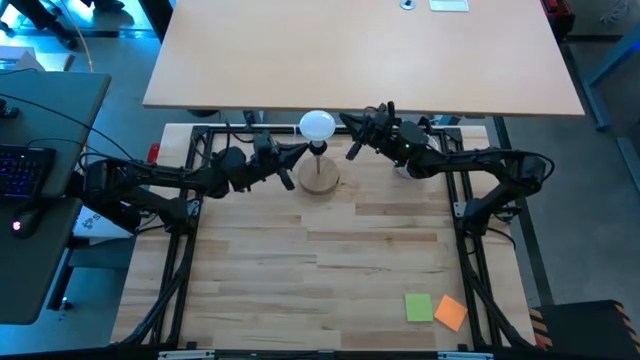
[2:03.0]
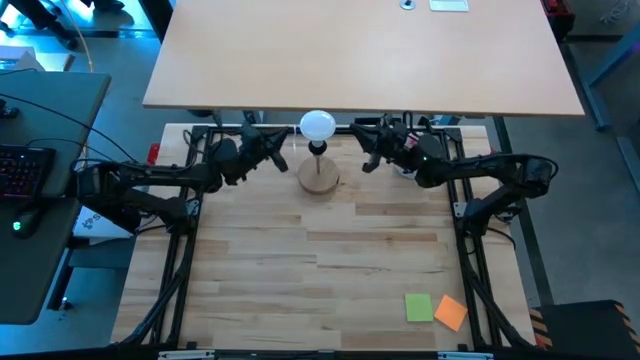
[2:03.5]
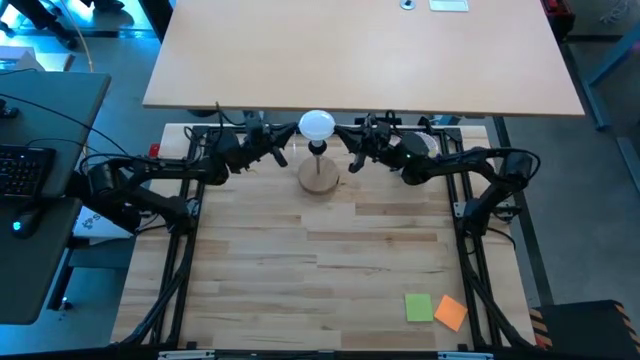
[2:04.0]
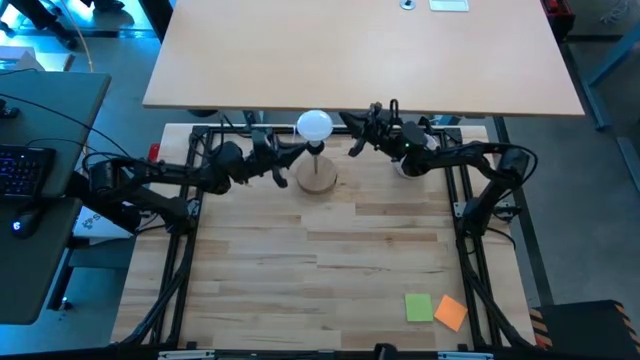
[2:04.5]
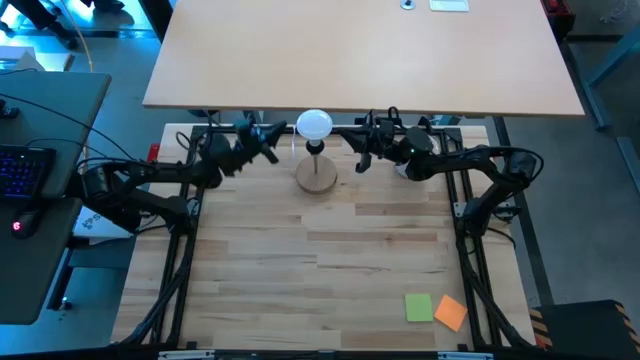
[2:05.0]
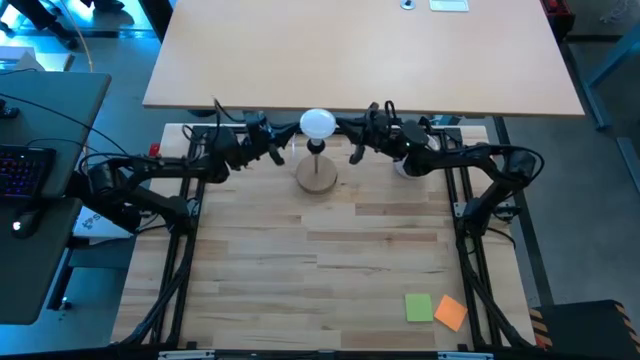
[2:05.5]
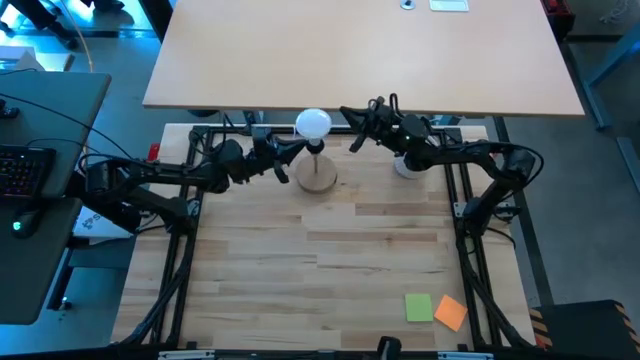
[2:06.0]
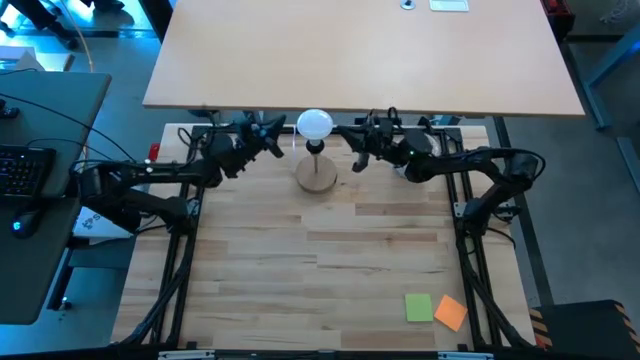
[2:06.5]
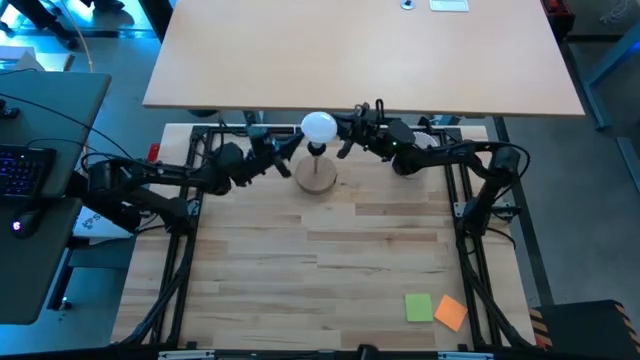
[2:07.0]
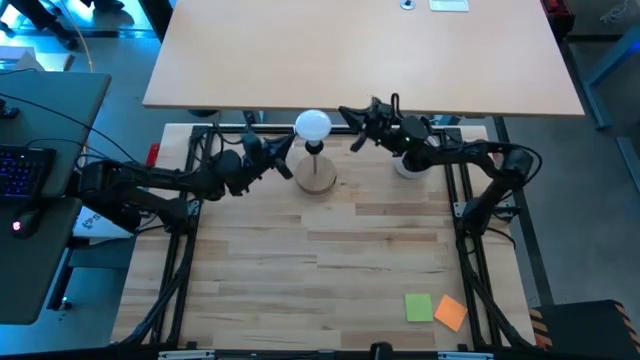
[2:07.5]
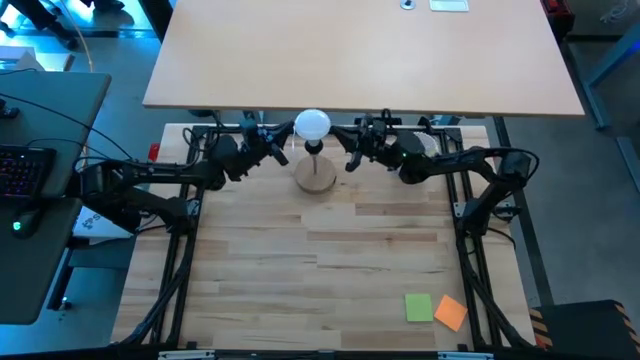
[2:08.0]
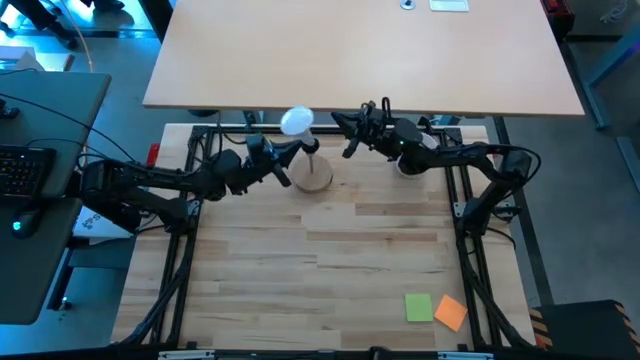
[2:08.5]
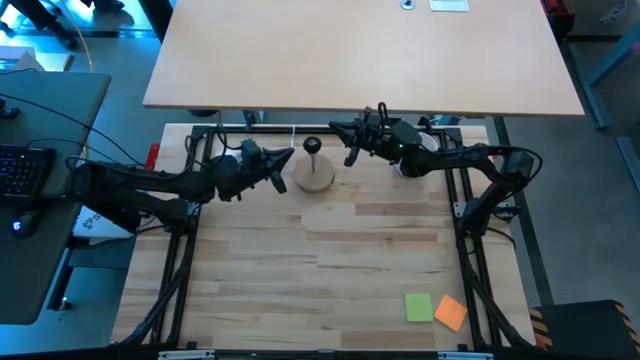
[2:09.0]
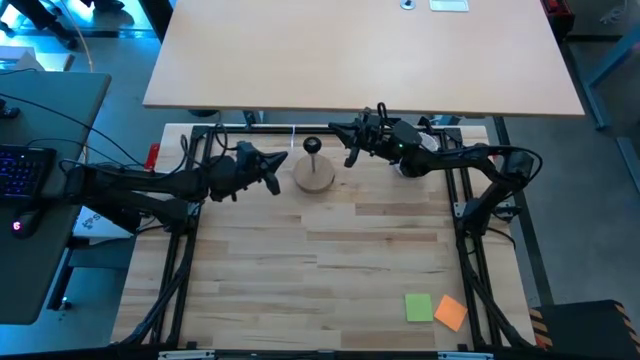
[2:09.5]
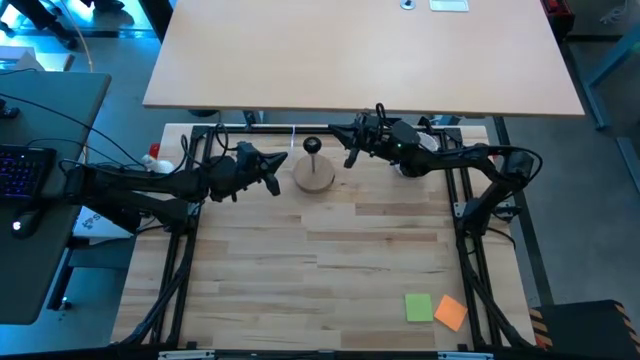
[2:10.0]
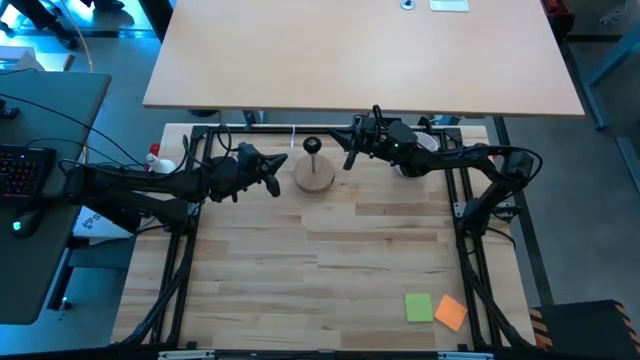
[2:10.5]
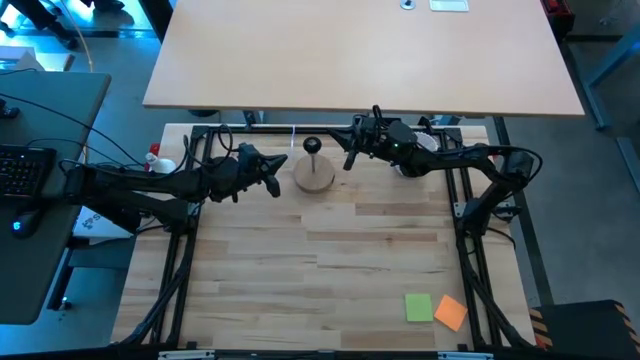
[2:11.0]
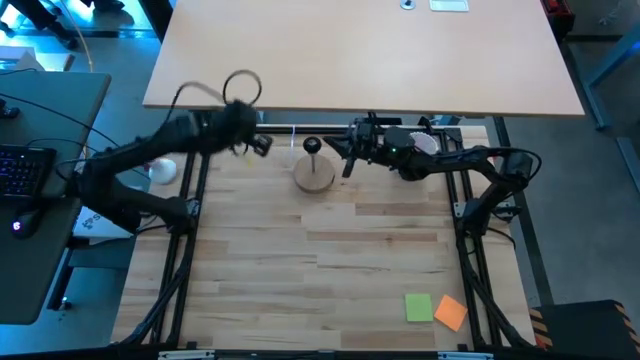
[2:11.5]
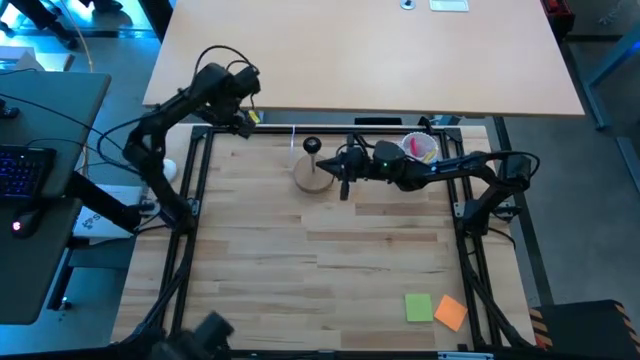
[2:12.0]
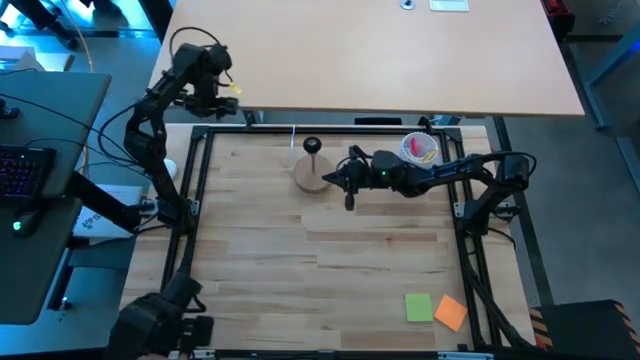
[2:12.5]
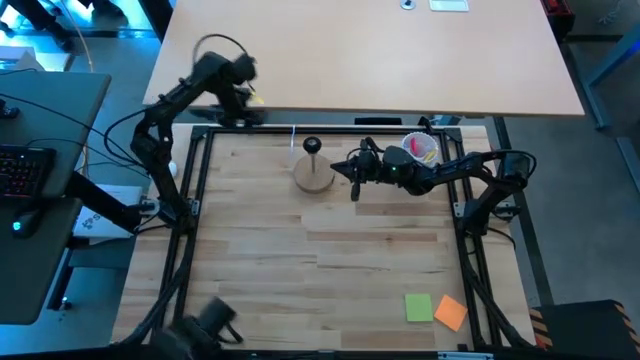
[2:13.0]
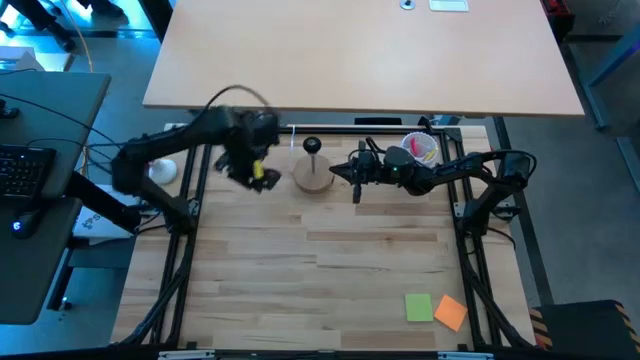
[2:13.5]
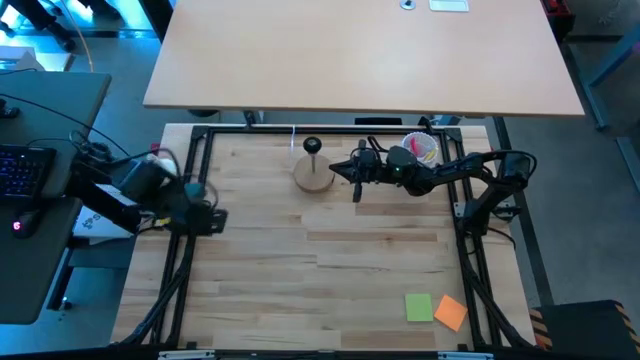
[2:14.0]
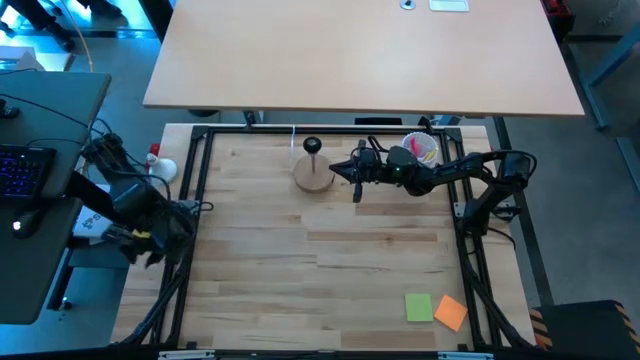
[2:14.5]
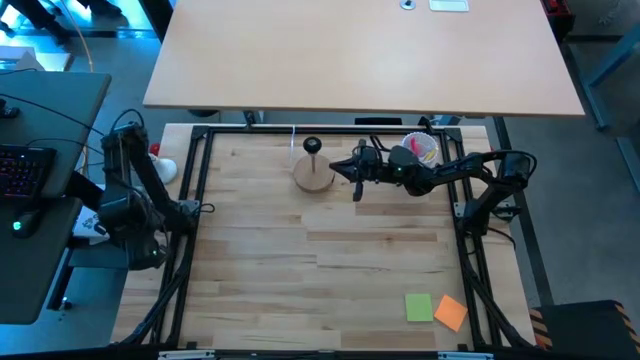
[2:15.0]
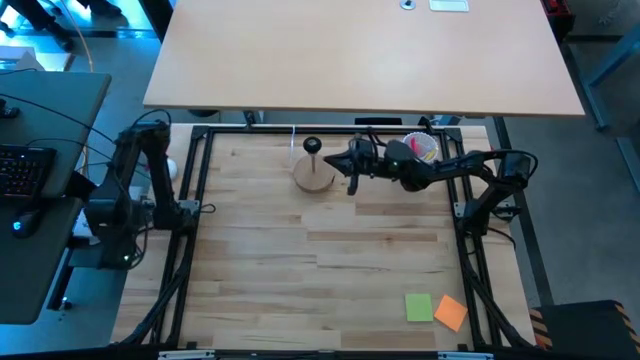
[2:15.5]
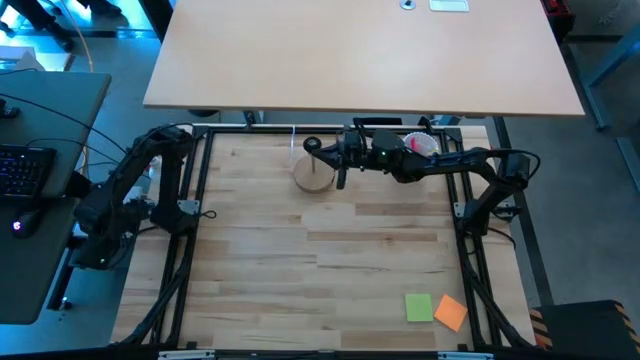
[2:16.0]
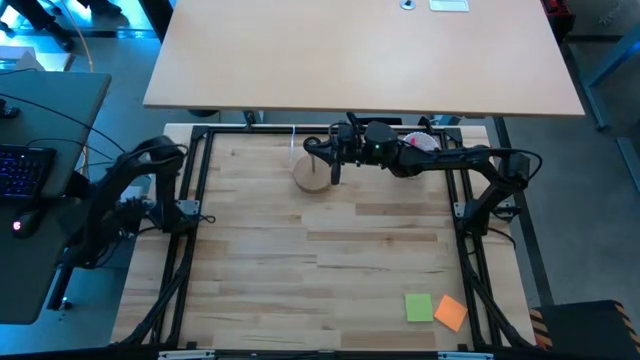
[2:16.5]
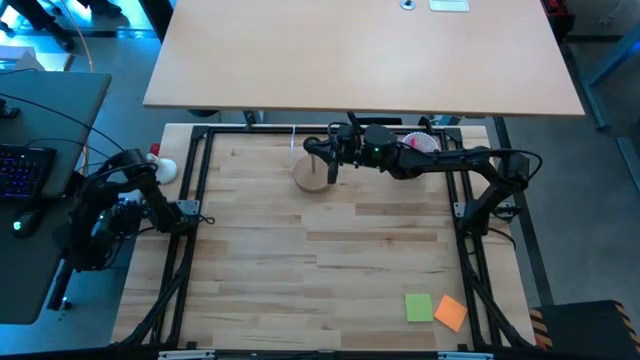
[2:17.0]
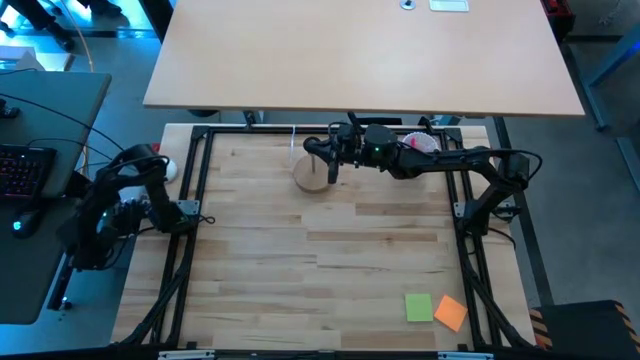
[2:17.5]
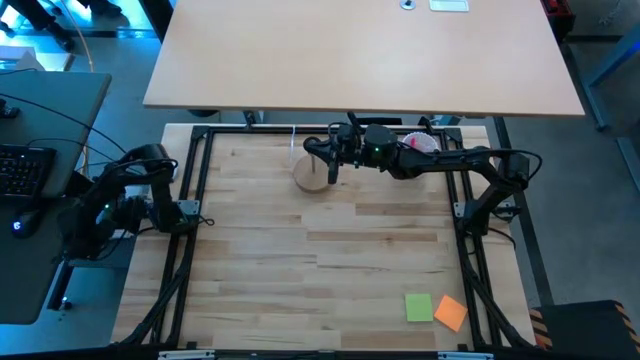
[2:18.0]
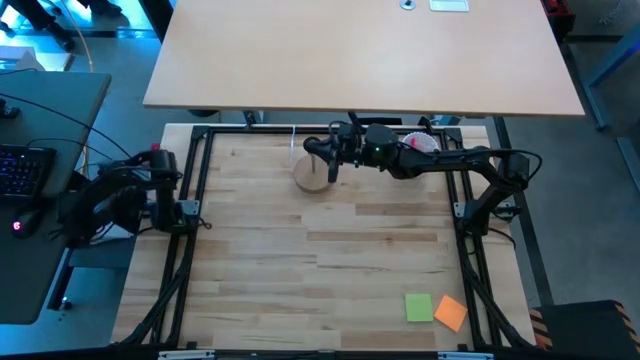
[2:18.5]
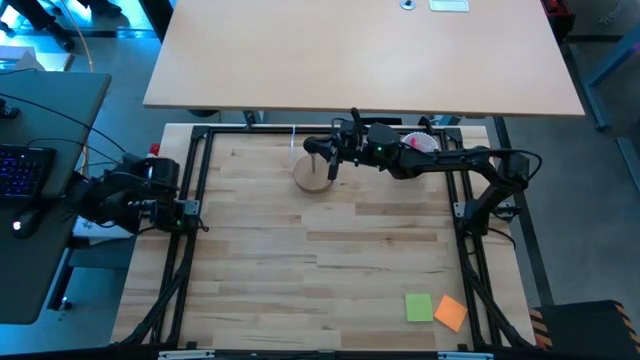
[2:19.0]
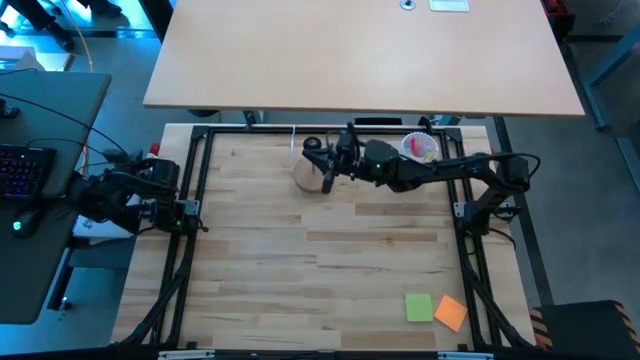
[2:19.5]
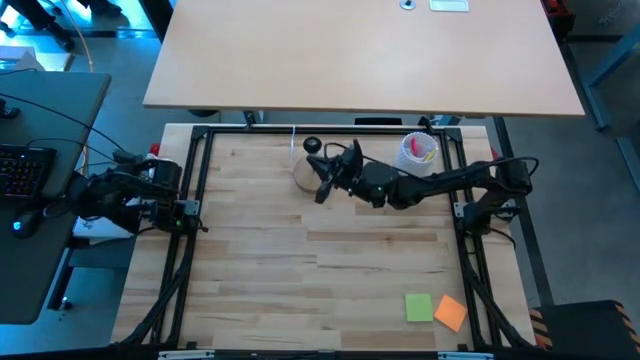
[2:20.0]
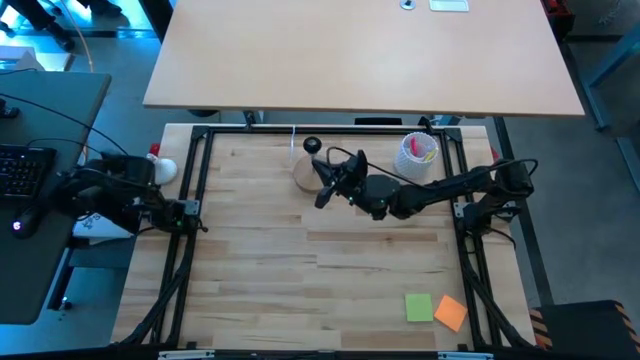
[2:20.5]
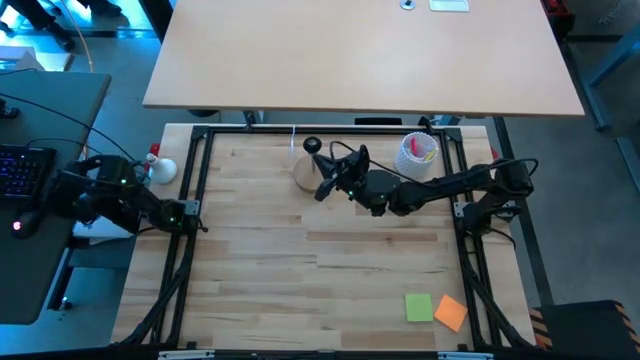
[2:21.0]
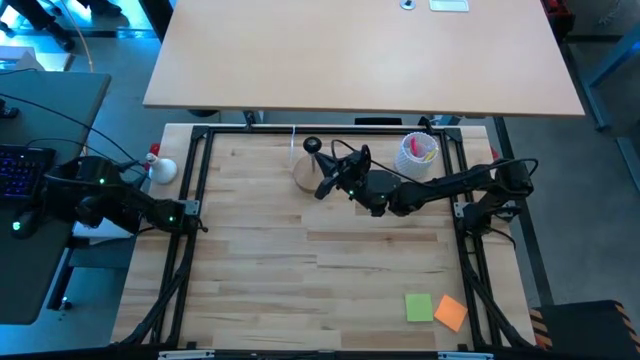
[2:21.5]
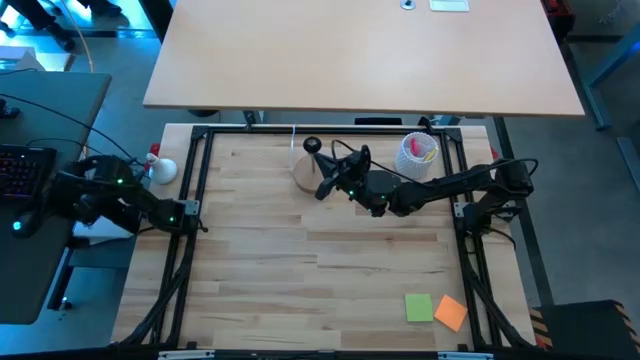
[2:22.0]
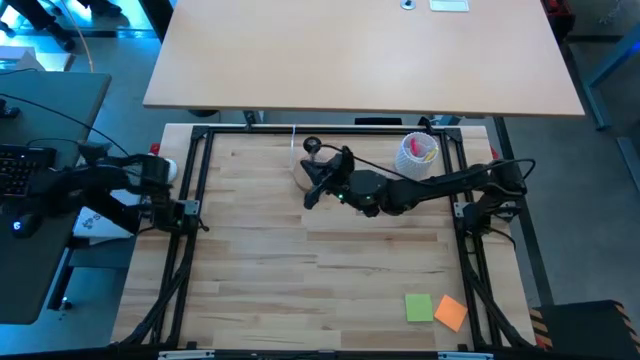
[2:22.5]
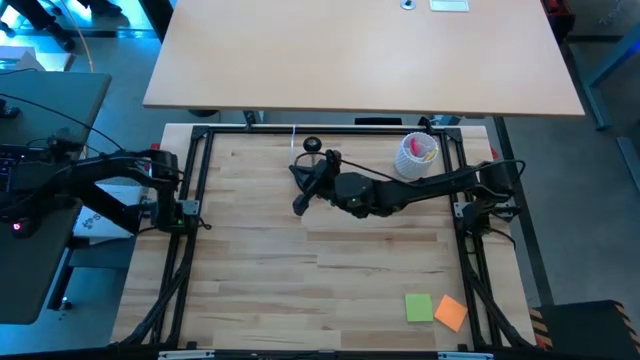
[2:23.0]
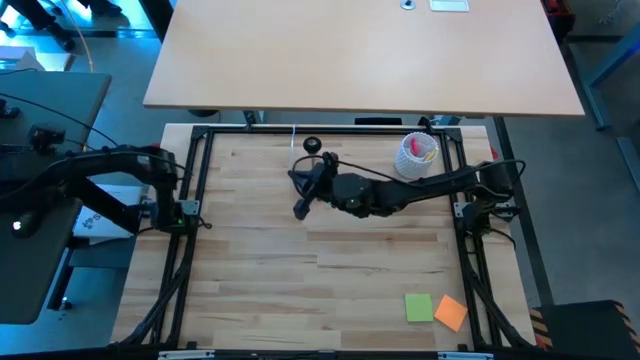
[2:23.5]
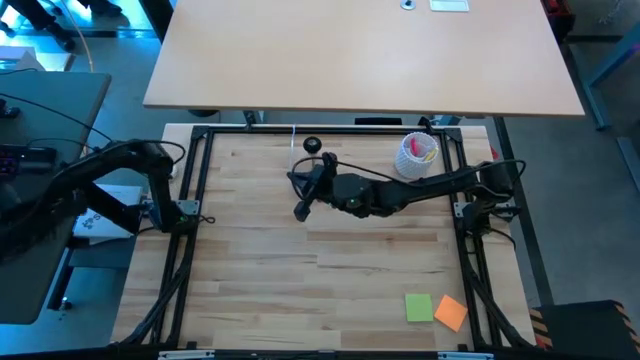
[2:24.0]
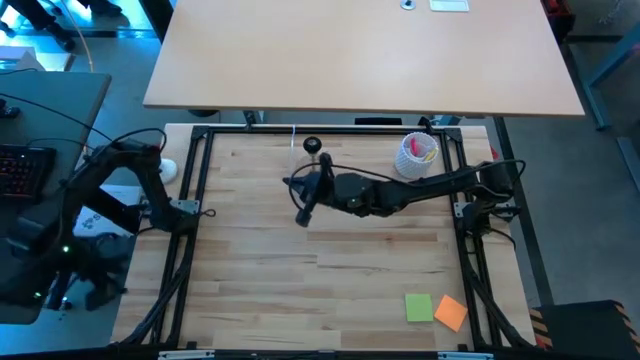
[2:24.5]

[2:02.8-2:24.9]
Task: Screw lightbulb
Remove the lightbulb from the brown lamp
